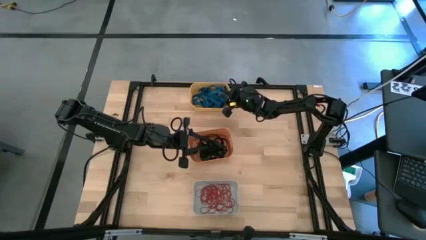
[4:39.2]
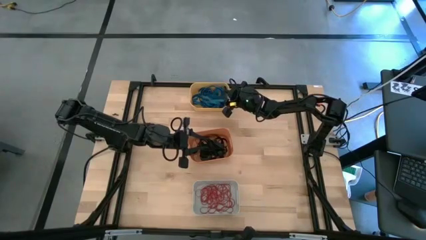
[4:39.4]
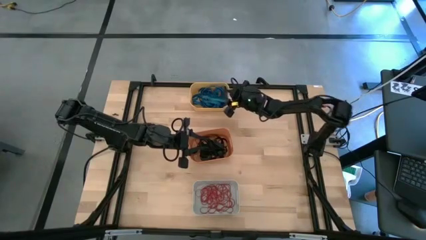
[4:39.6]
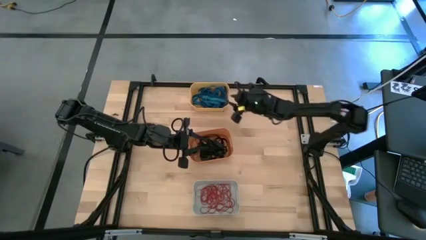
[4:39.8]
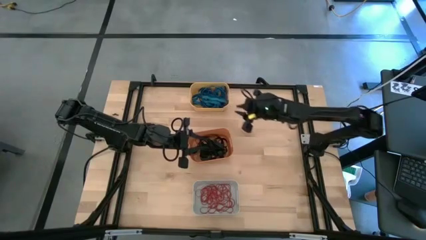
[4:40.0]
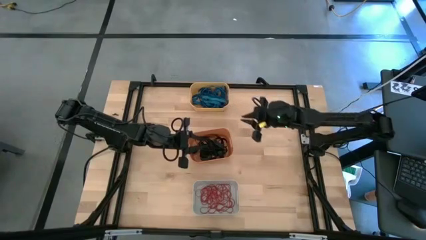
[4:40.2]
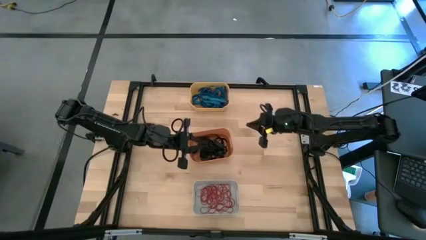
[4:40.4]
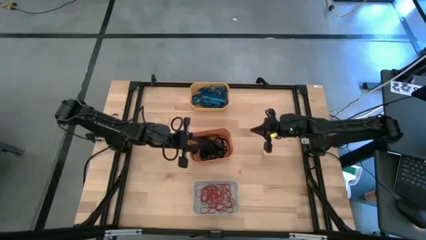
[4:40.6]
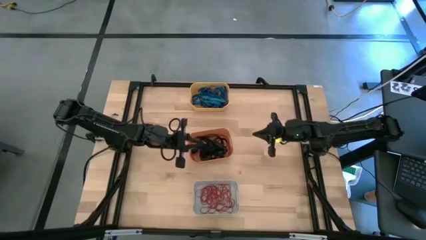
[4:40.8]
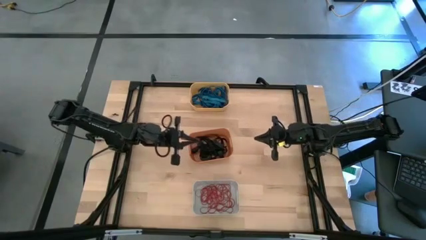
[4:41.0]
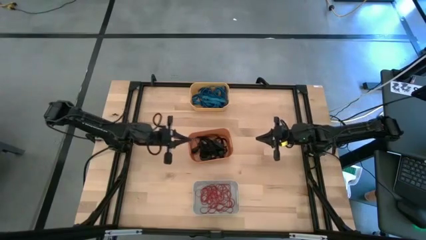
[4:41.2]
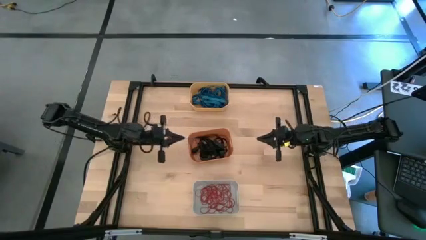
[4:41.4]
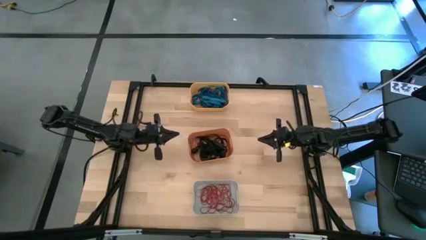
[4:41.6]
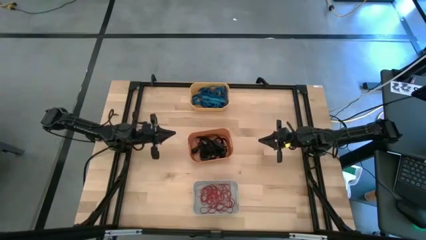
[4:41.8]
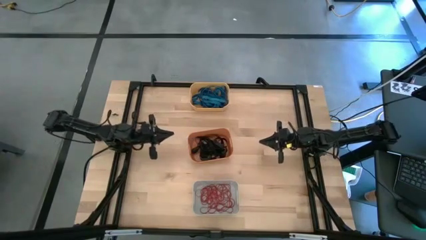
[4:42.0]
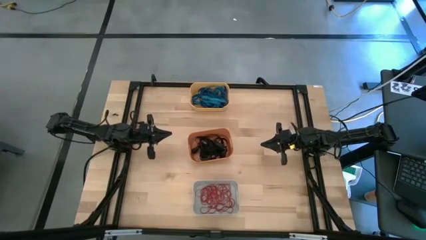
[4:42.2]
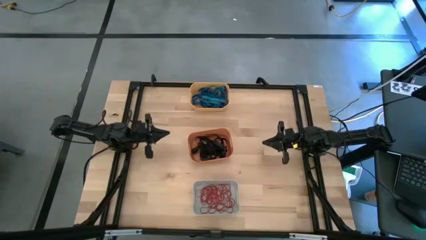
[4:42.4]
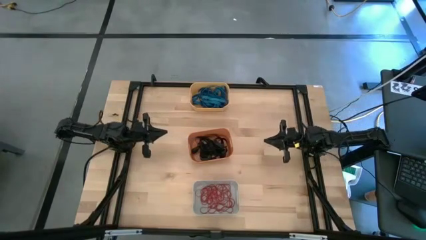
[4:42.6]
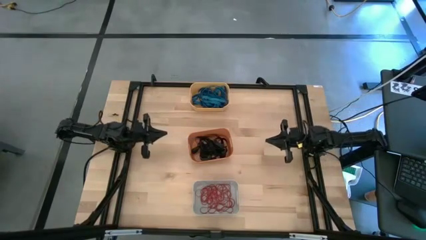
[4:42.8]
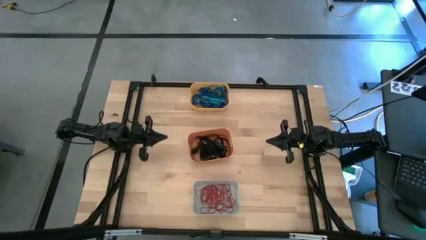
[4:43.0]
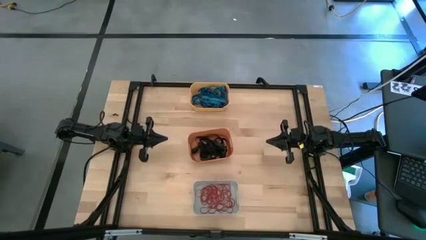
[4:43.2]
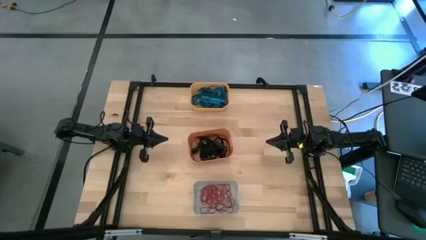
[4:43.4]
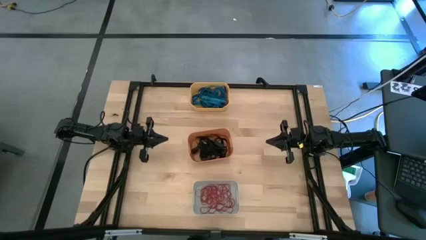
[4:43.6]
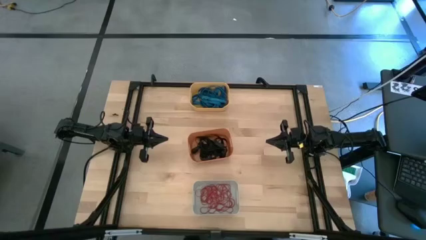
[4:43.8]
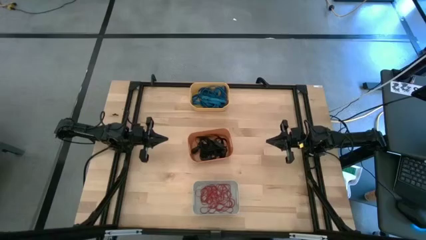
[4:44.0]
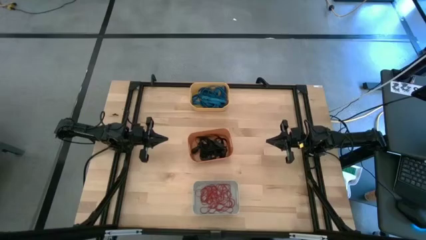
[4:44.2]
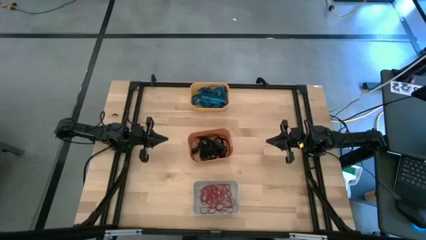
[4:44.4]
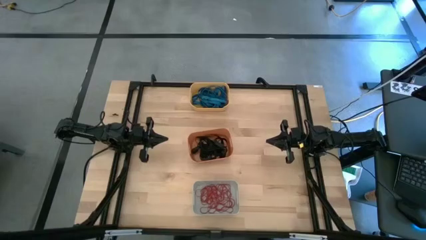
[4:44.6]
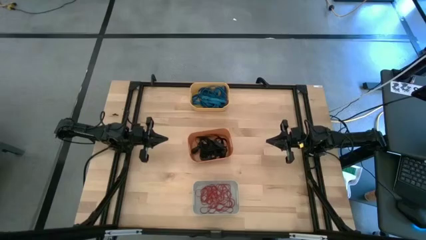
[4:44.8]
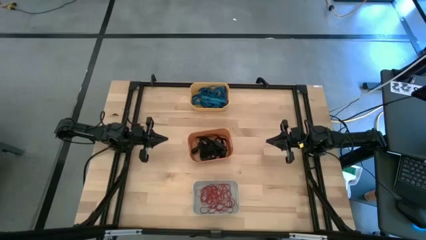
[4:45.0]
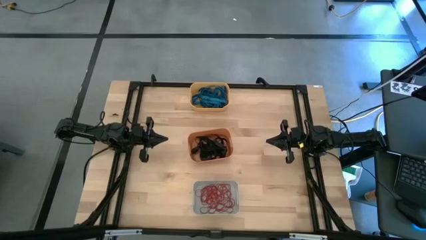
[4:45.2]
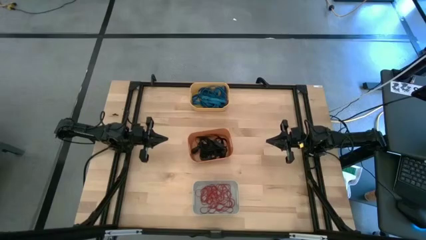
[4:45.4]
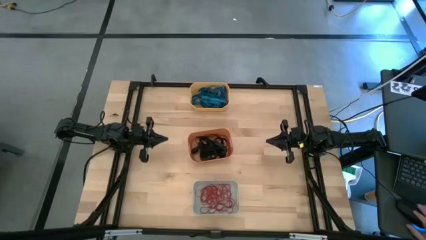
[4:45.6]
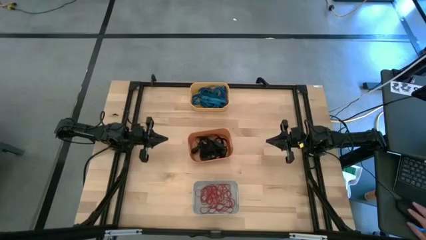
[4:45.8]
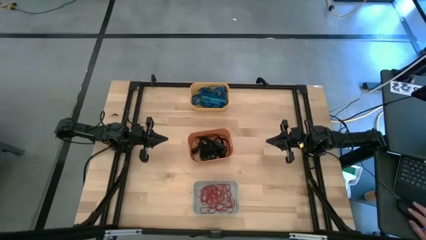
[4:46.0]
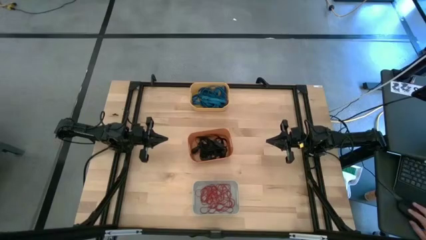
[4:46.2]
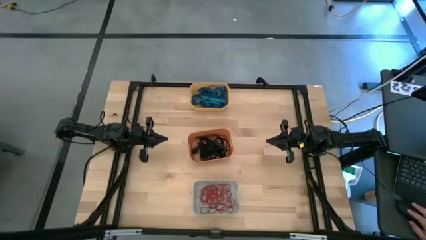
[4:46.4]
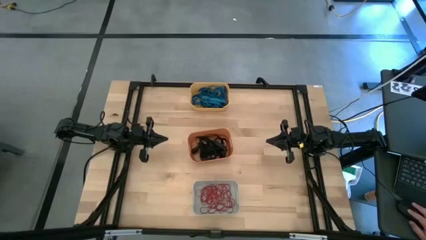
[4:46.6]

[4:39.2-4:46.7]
Task: Sort rubber bands into baskets
Return to Home Position

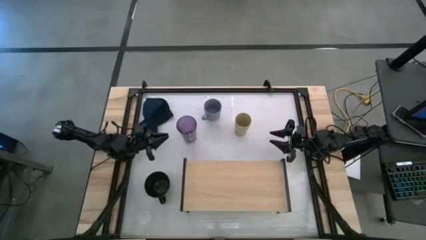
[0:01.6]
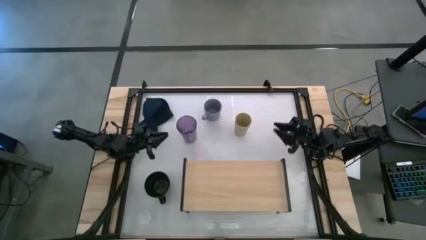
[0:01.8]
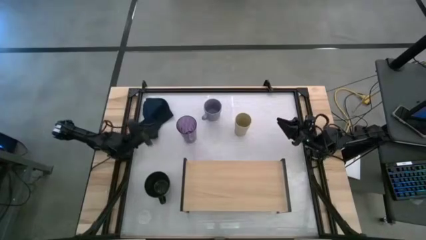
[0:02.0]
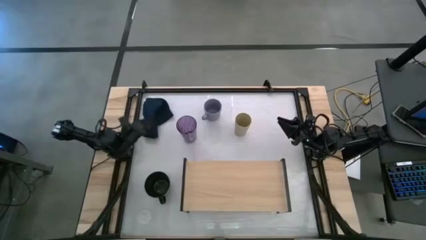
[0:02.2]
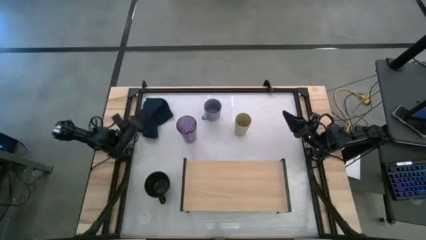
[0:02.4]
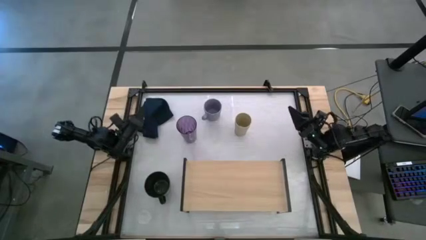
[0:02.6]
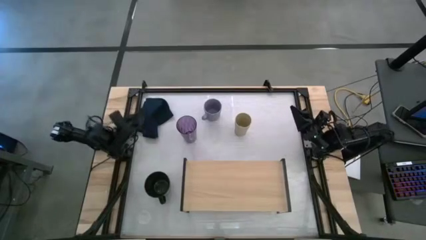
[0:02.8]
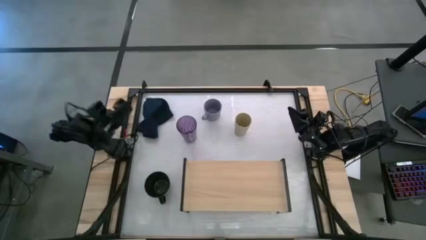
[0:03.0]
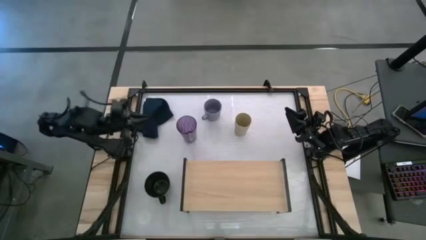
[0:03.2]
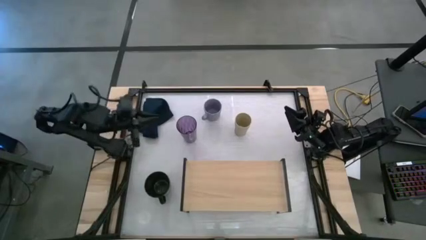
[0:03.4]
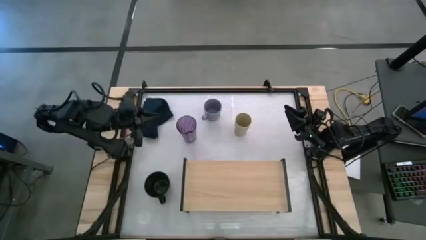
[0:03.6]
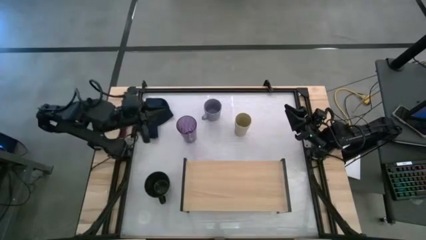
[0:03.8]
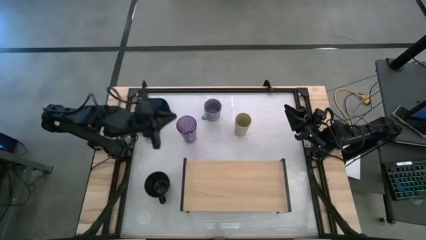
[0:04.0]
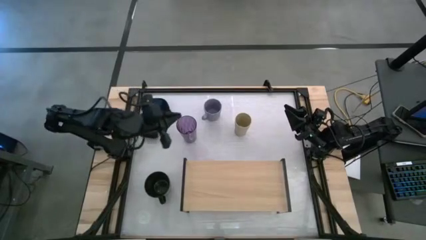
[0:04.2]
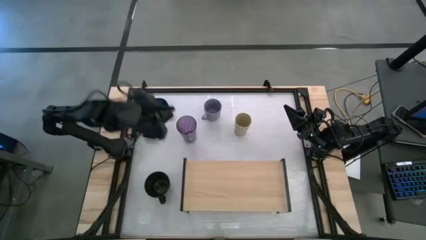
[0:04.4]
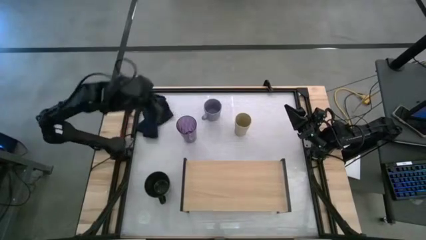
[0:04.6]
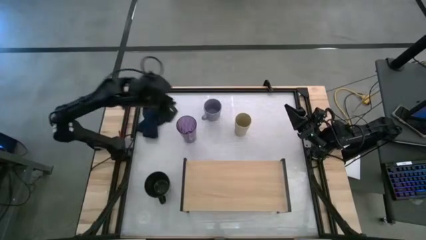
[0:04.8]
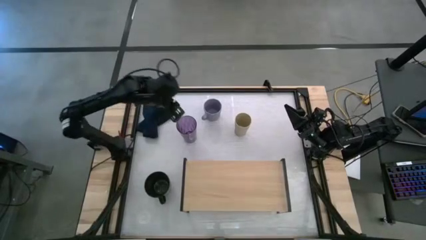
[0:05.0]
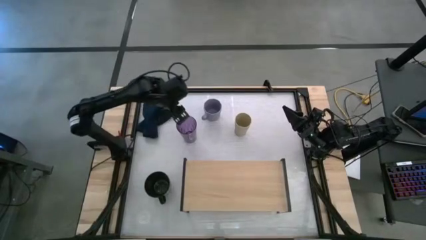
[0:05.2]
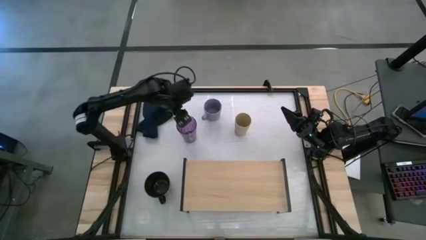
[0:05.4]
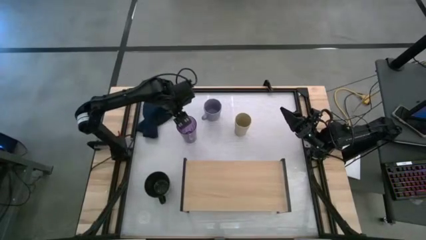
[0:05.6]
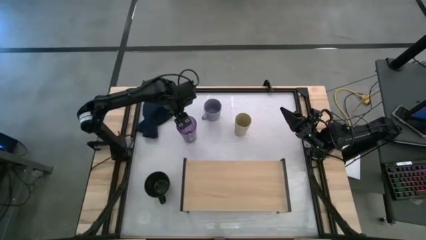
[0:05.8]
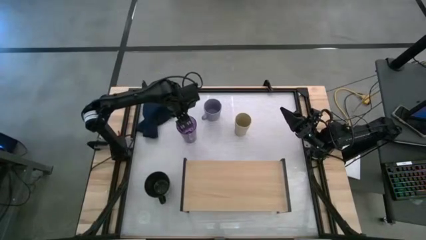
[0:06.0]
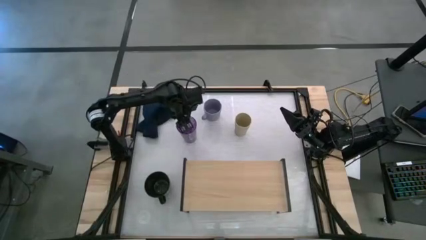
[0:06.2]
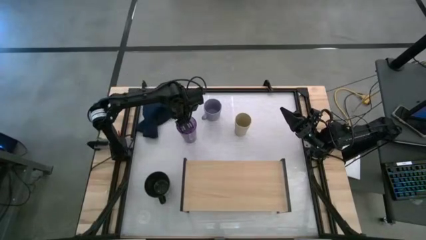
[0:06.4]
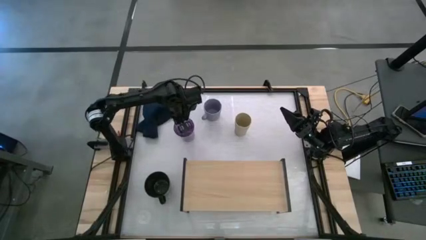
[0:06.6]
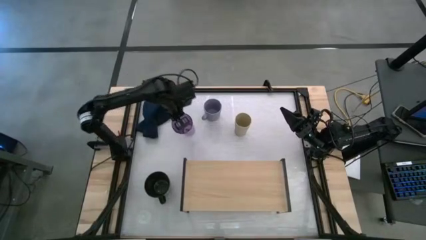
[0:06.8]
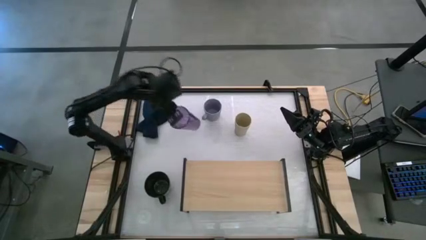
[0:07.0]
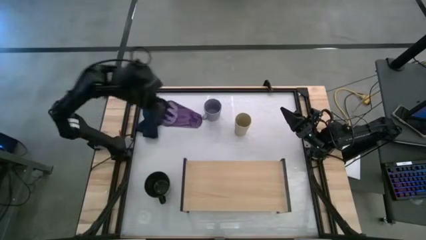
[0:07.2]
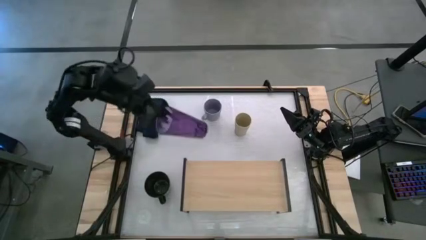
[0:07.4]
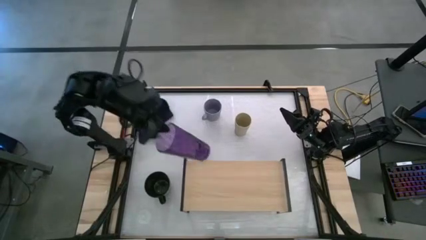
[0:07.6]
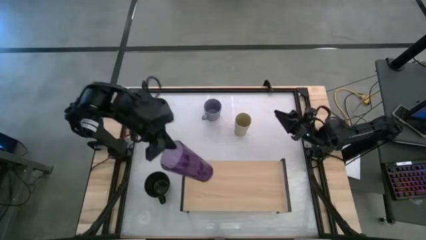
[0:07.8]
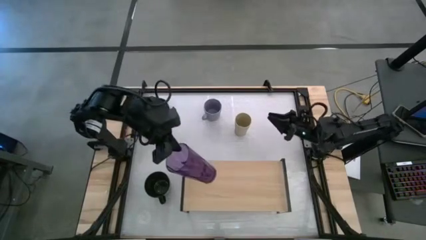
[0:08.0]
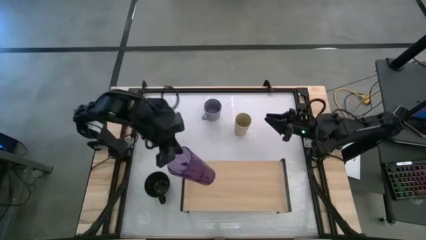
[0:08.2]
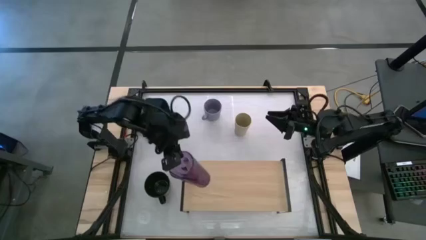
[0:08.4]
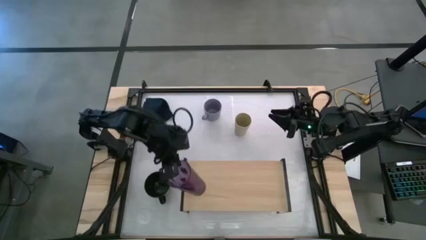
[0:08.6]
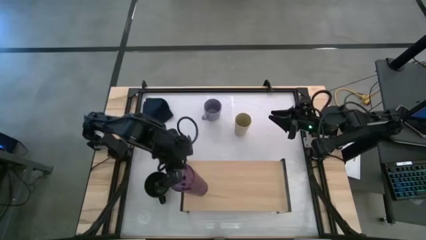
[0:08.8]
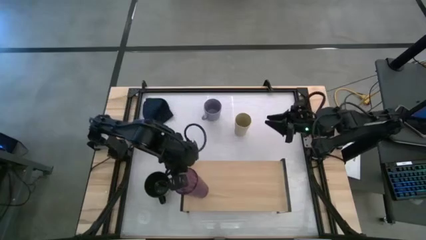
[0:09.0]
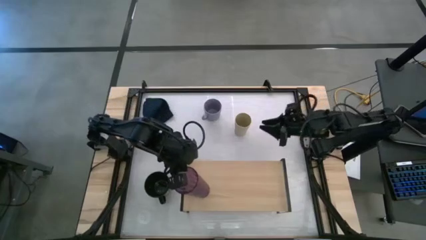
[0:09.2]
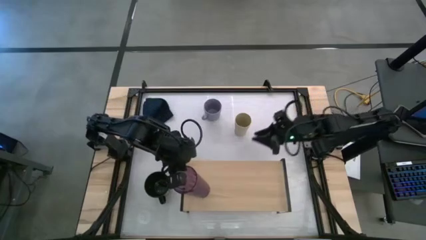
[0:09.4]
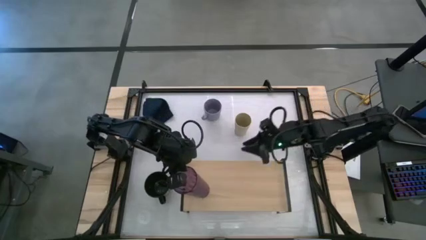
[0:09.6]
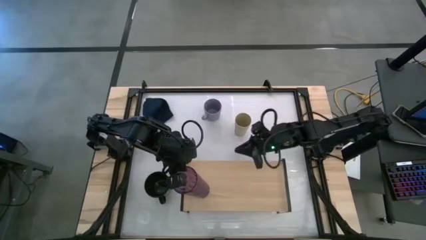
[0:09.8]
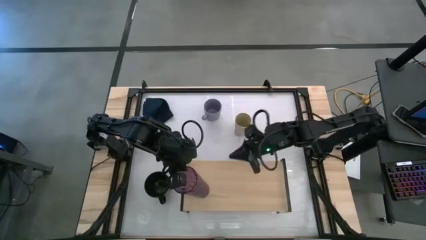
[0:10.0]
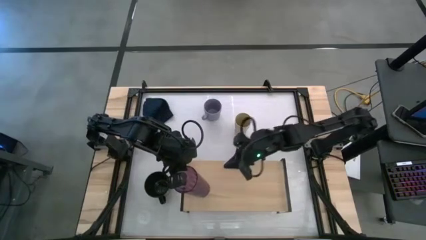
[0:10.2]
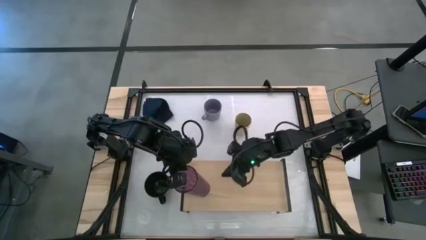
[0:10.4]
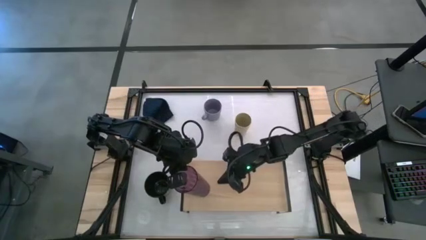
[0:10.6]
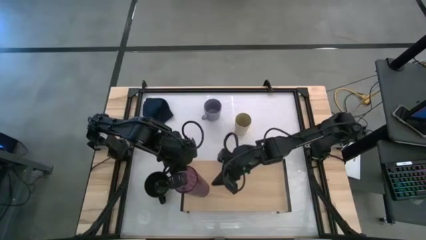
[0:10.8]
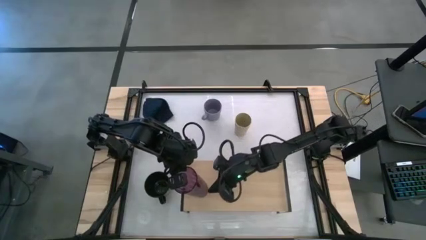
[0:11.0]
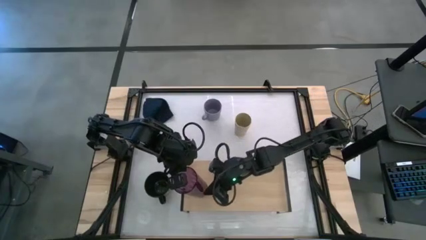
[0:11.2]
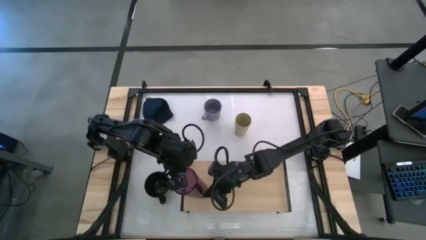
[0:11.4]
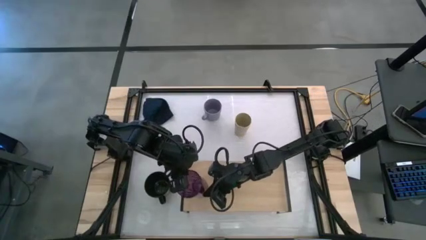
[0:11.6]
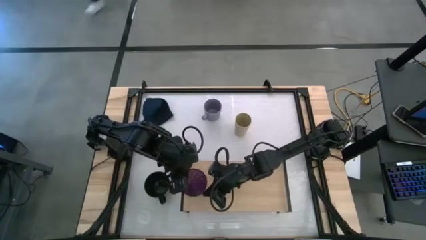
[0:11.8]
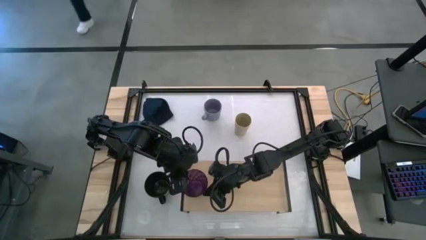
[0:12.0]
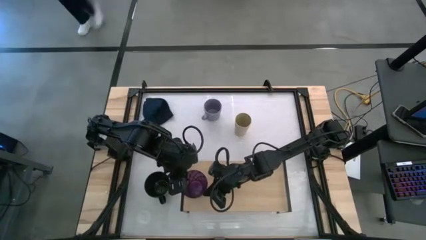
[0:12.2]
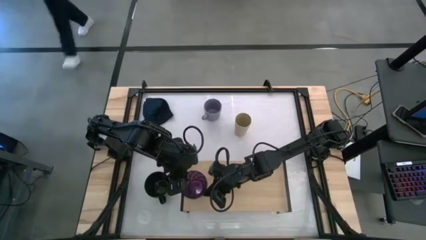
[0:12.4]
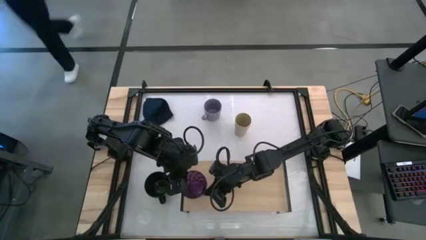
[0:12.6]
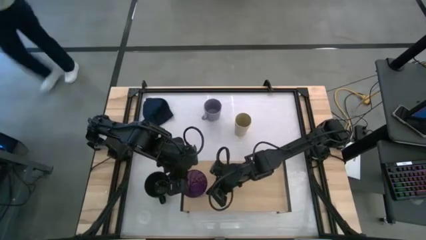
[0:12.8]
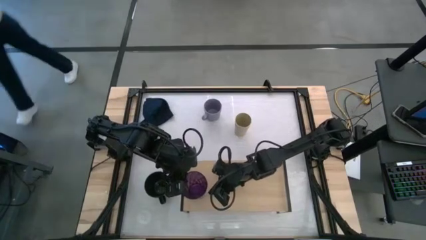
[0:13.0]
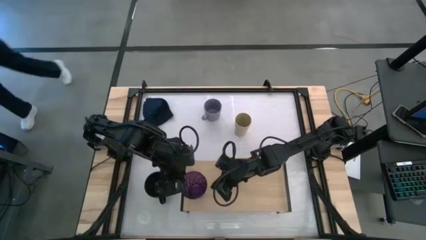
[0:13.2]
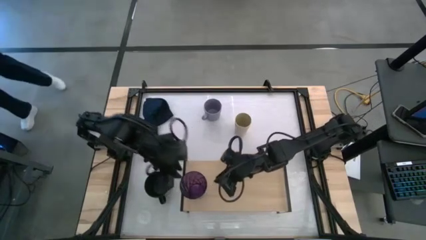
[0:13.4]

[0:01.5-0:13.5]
Task: Stack small to large cups/mugs on shelf
Put the purple cup on the shelf
